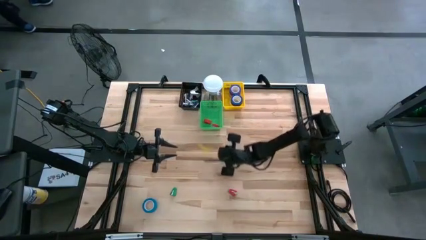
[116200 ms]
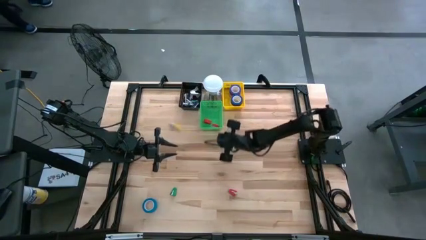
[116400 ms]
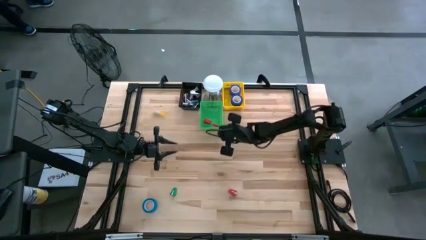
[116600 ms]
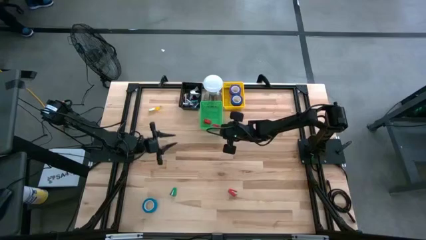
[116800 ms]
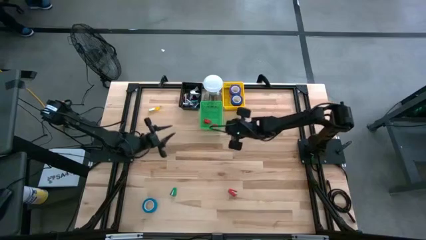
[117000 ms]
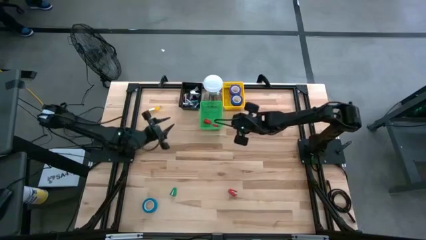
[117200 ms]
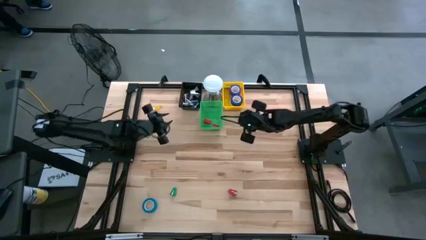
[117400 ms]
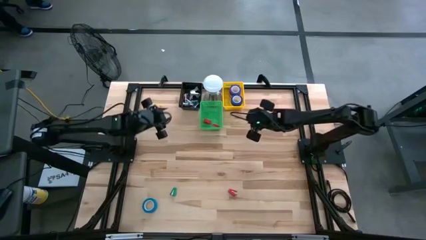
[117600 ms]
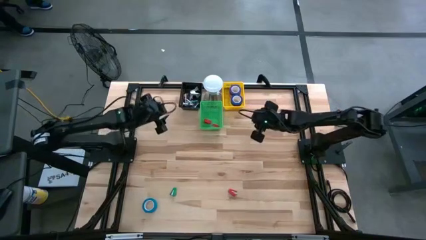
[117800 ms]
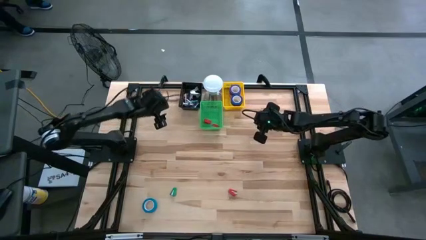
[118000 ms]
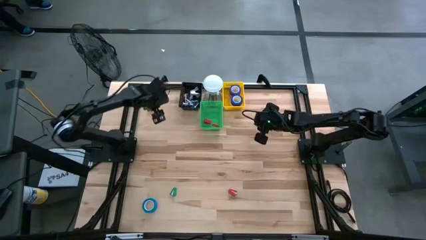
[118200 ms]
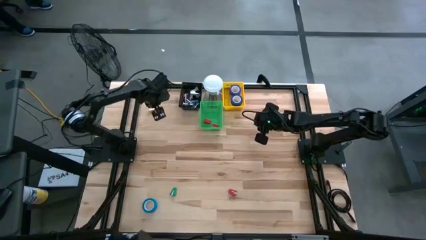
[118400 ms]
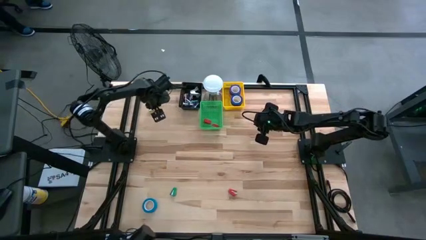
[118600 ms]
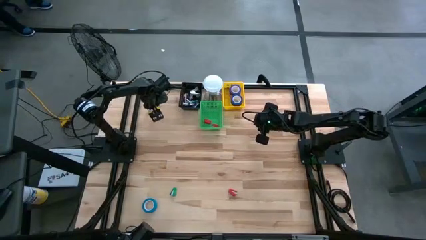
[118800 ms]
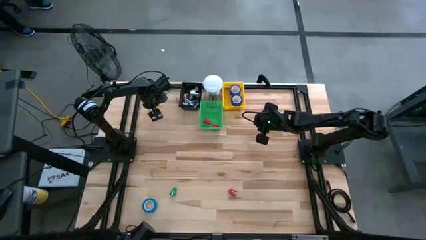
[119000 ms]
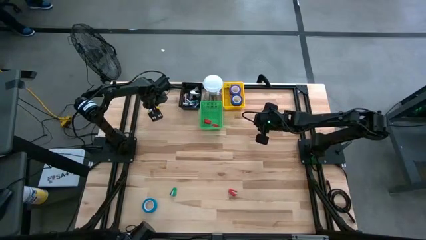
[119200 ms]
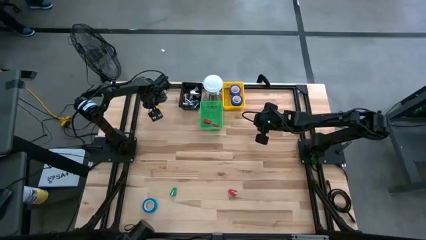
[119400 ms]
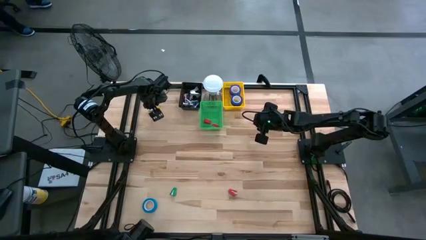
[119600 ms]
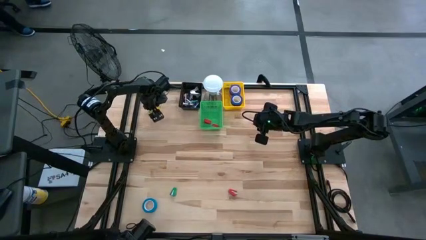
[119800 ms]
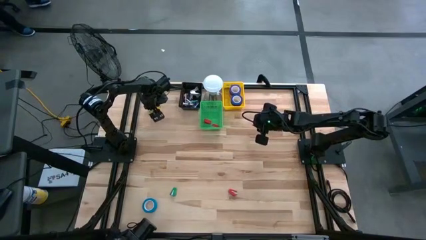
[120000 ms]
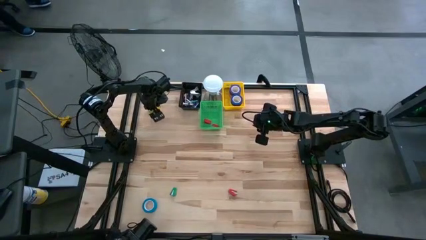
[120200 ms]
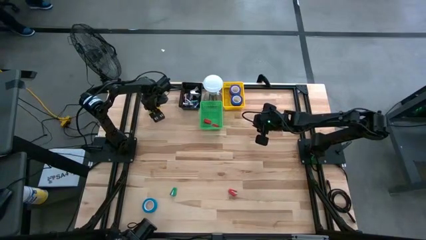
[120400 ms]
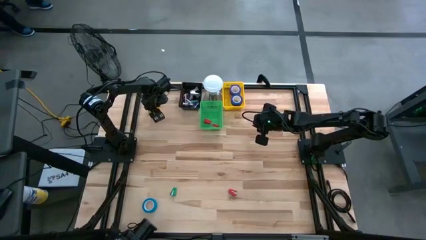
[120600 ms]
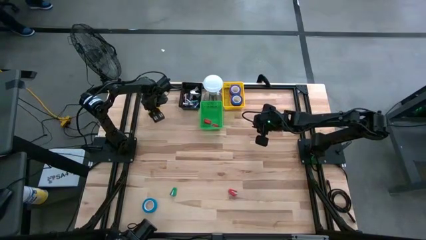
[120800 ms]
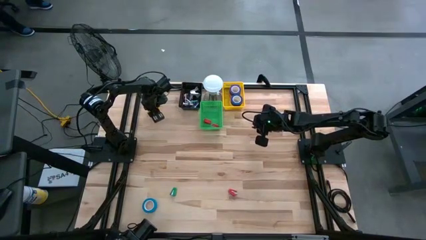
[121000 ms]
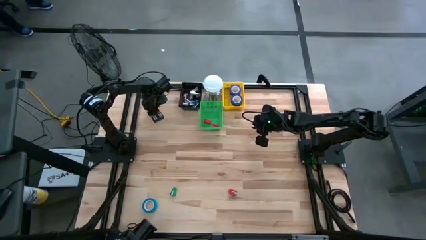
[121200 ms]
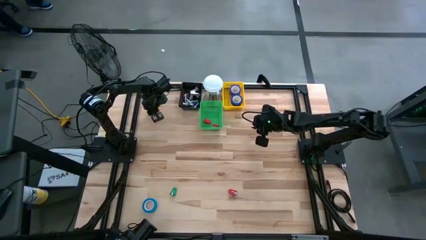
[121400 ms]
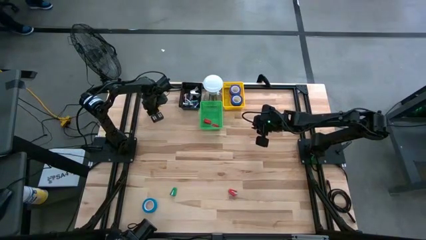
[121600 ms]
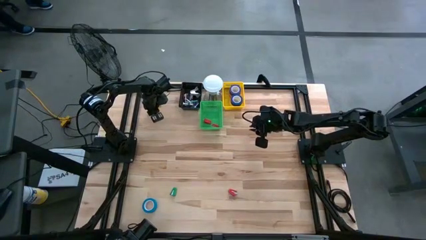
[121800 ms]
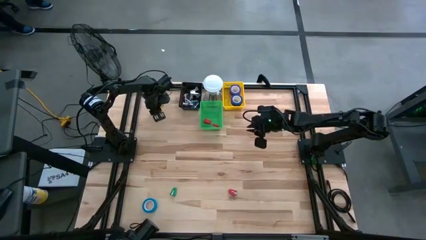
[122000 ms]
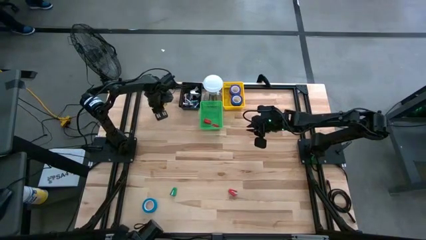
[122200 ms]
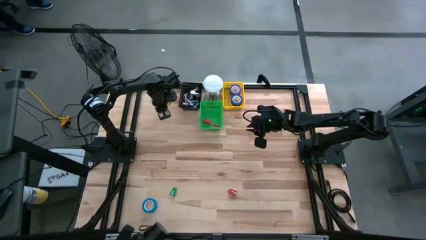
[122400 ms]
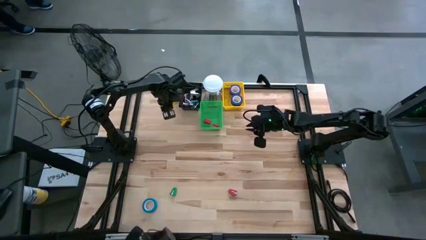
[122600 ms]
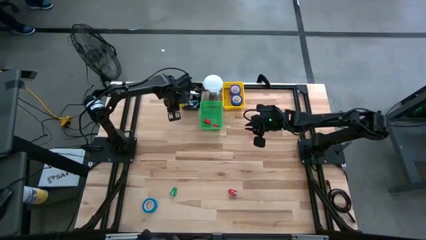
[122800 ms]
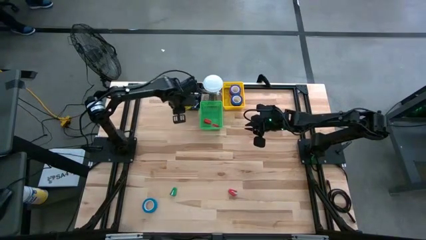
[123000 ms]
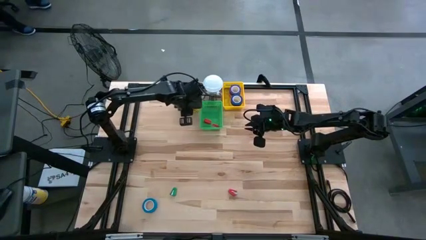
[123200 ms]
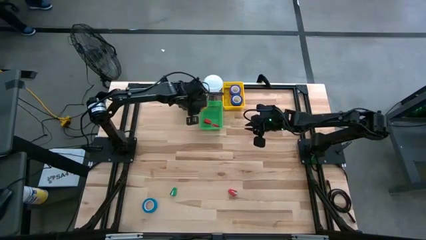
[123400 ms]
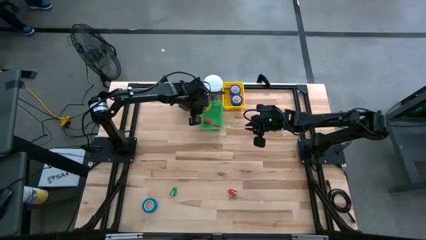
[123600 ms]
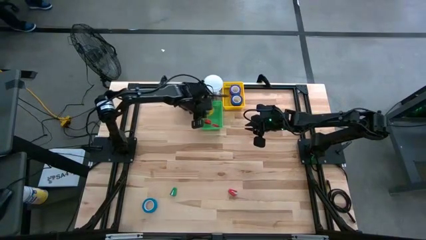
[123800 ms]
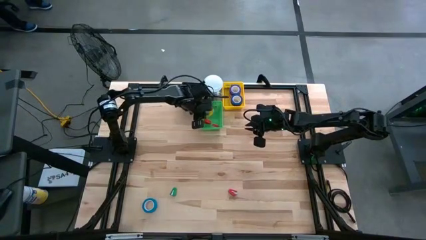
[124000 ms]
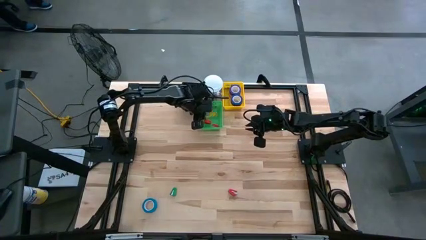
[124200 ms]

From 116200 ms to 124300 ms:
Task: Pick and place Stapler, Stapler remover, tape
Put the yellow stapler into the green bin

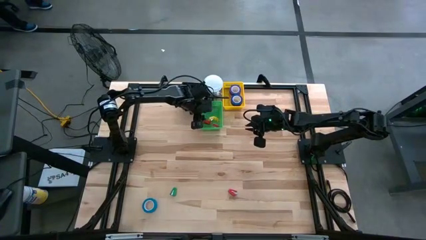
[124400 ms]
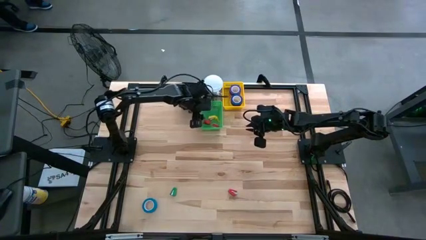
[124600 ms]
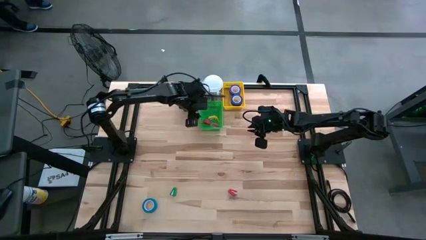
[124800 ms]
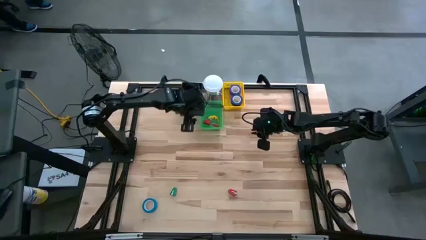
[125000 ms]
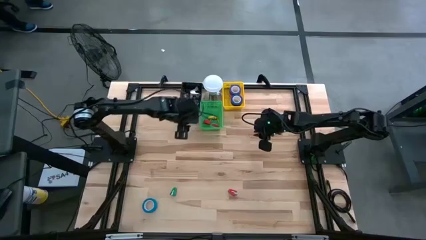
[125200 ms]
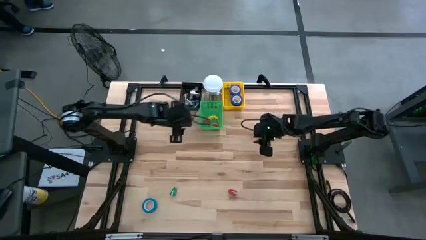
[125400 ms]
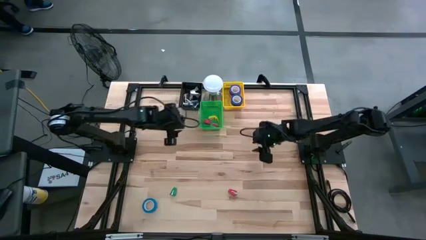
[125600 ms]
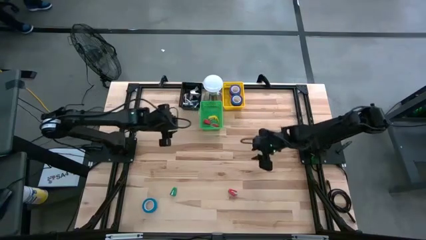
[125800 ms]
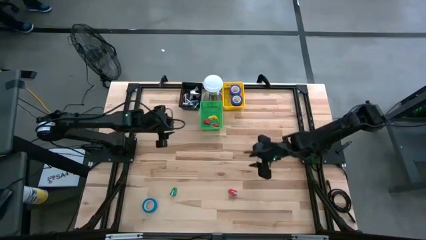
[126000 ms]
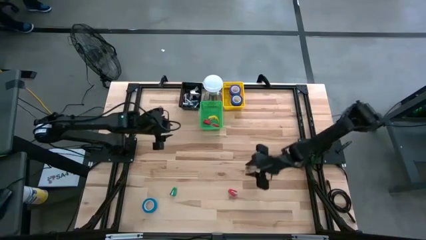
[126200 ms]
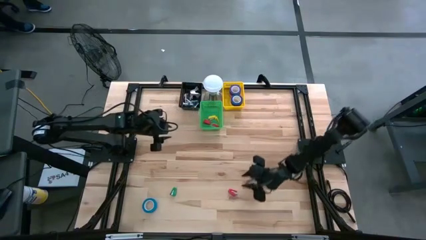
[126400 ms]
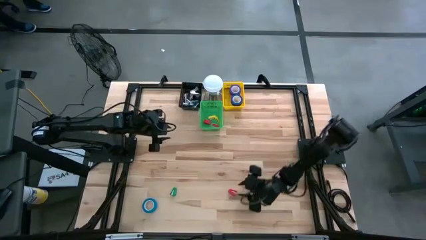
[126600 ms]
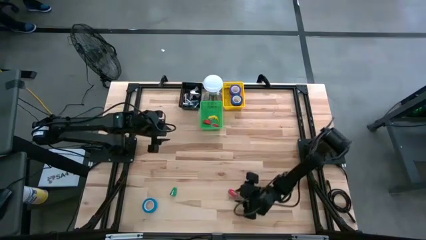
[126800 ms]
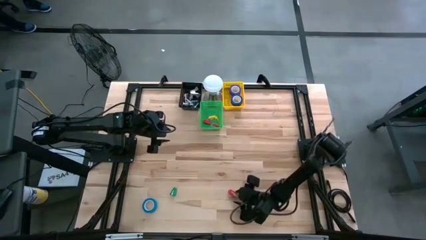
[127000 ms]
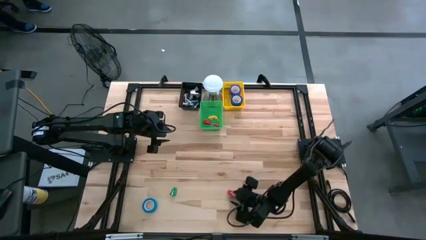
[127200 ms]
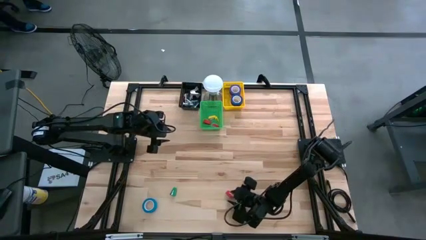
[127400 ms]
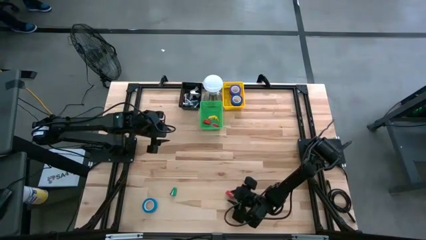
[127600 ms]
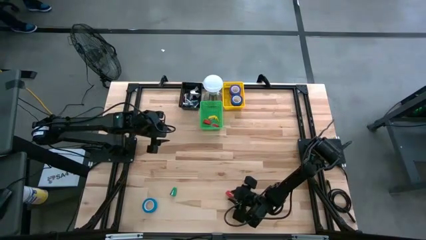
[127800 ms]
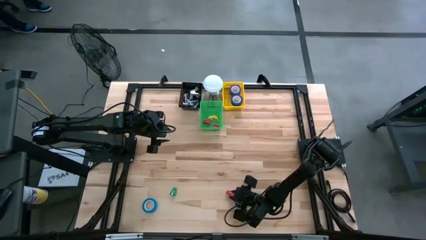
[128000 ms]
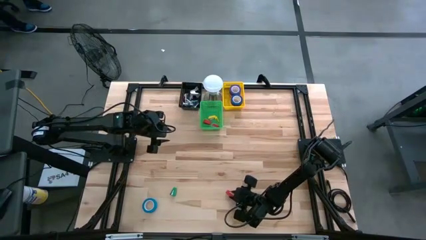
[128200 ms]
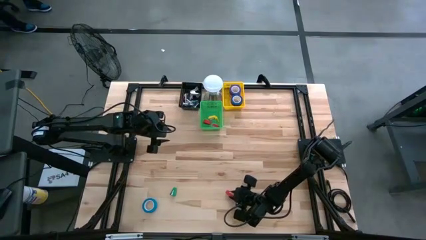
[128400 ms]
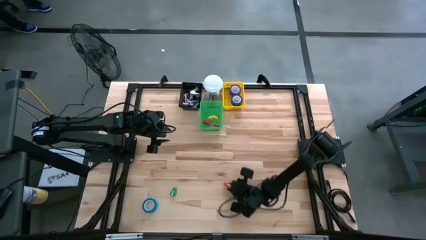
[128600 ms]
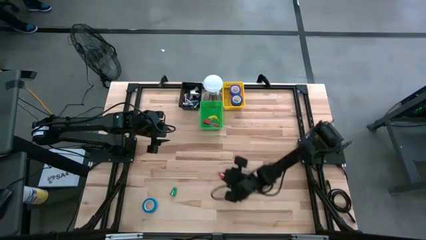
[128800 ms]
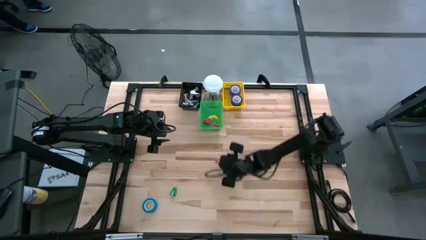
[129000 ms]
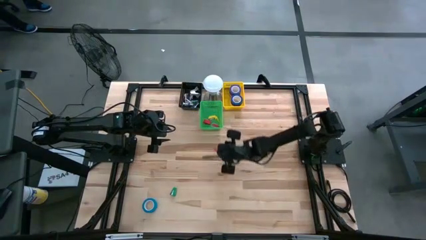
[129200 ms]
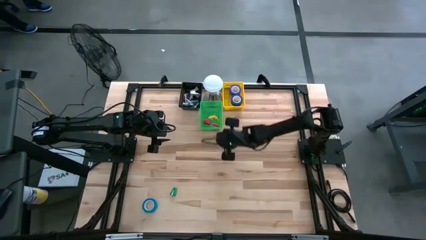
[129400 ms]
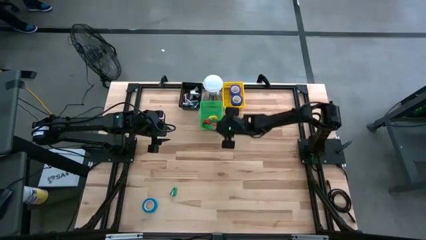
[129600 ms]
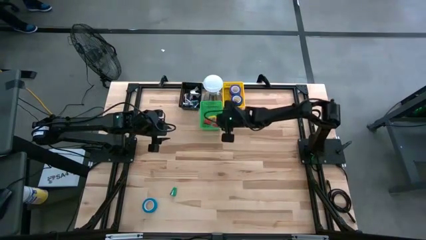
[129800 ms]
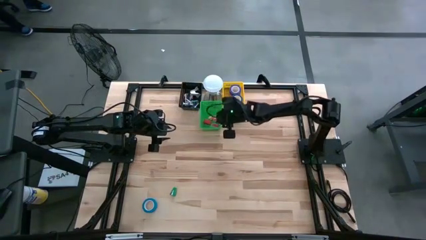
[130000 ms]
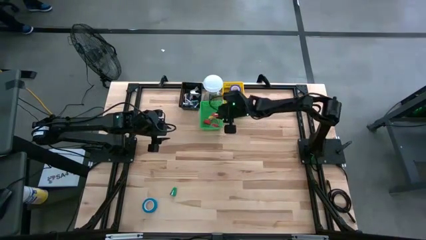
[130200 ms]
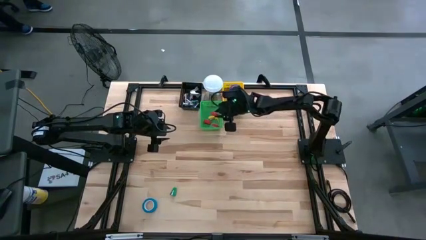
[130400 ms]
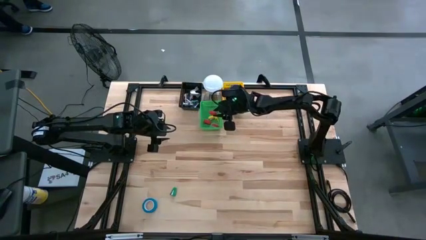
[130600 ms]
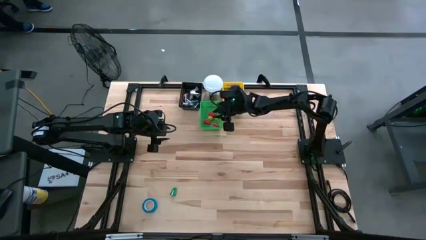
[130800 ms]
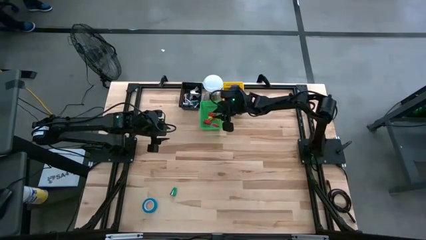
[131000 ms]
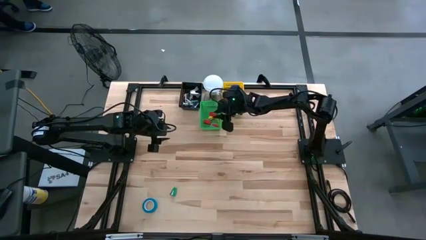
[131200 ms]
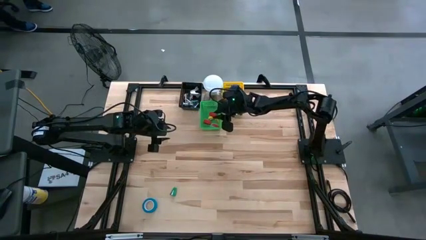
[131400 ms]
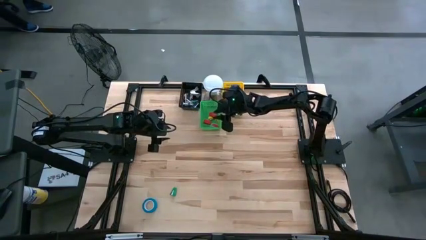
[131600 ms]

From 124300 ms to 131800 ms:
Put the red stapler into the green bin

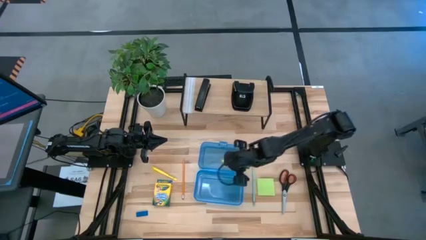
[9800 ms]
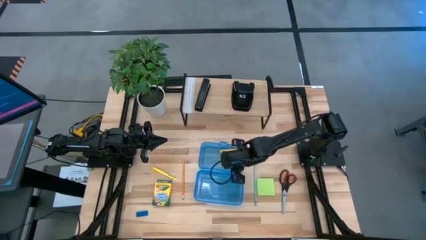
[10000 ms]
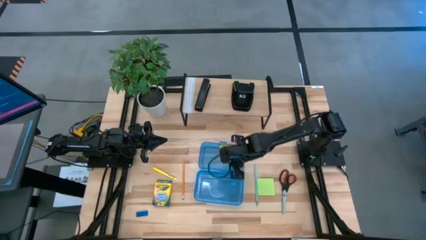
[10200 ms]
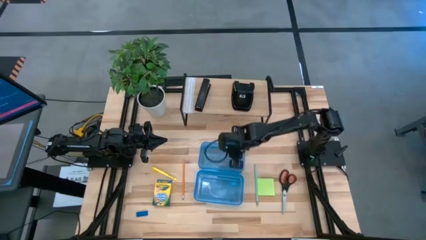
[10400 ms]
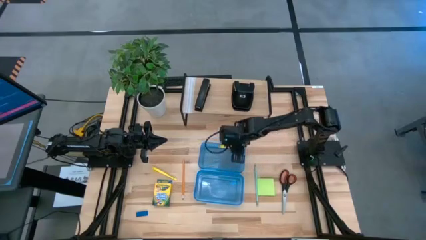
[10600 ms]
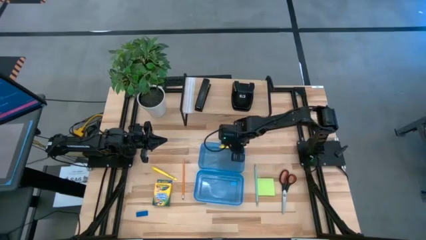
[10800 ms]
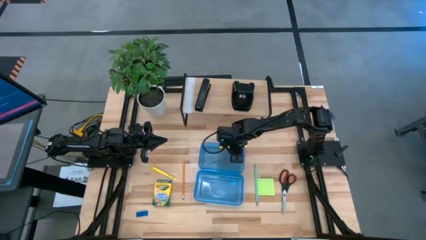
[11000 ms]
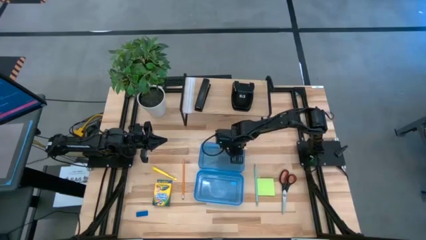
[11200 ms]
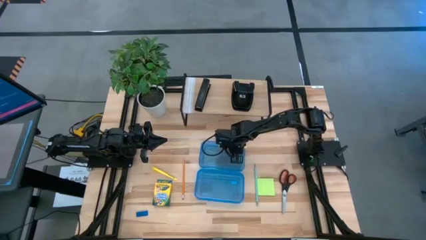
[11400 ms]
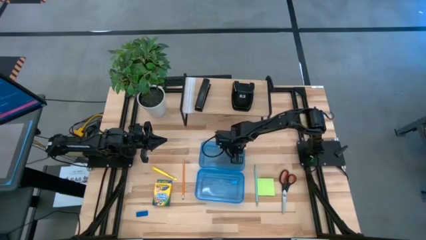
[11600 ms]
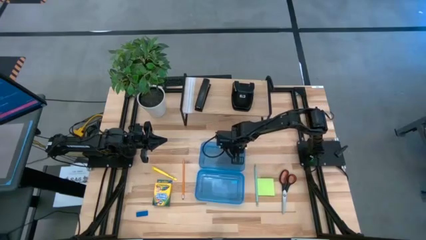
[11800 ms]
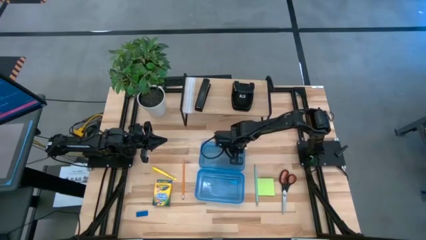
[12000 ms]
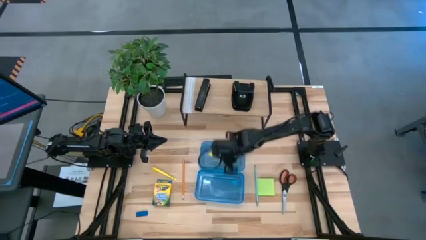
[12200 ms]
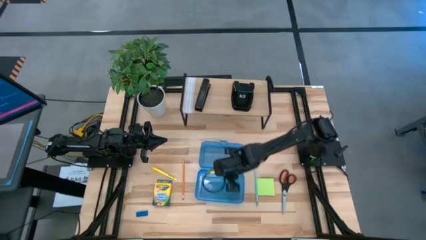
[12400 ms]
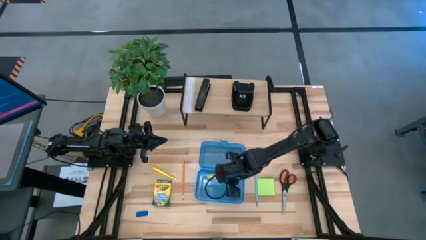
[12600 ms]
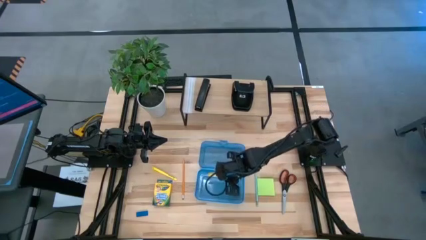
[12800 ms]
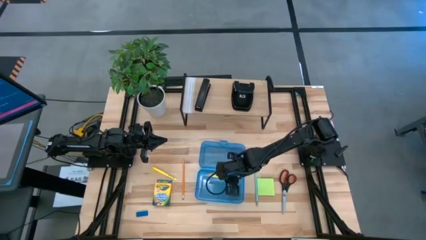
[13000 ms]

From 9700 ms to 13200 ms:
Task: Pack school essentials
Put the right yellow pen into the blue supply box
